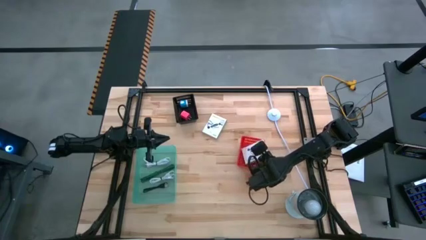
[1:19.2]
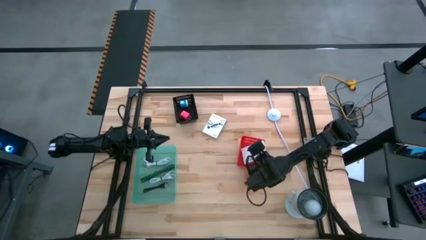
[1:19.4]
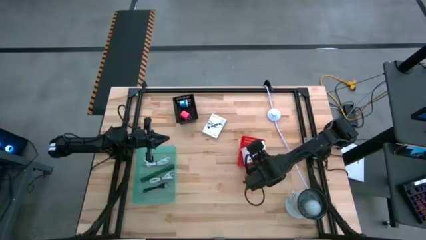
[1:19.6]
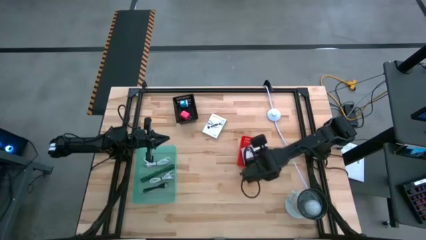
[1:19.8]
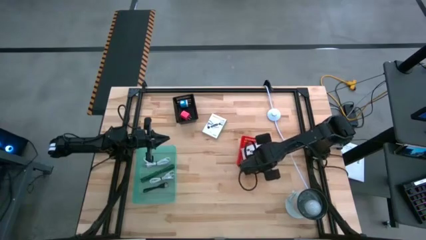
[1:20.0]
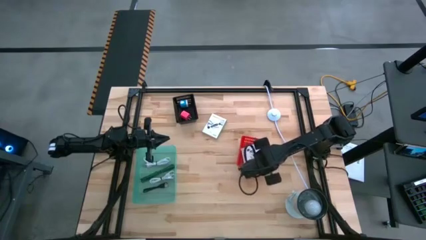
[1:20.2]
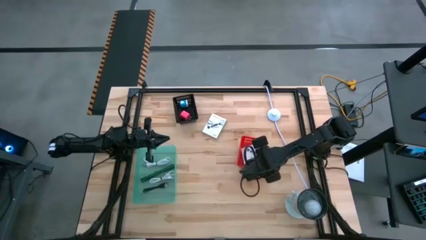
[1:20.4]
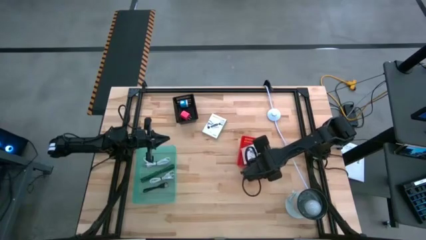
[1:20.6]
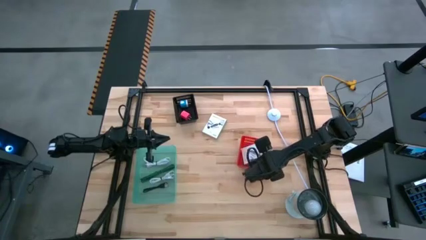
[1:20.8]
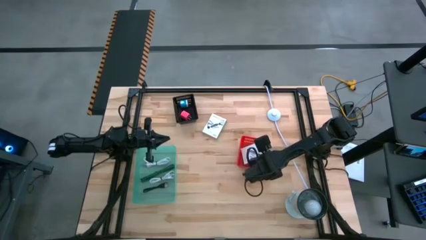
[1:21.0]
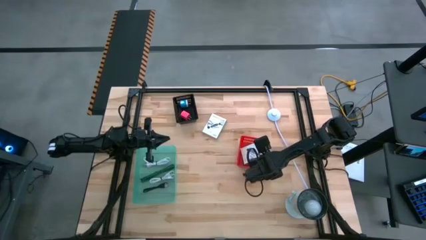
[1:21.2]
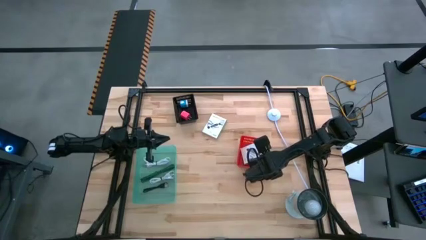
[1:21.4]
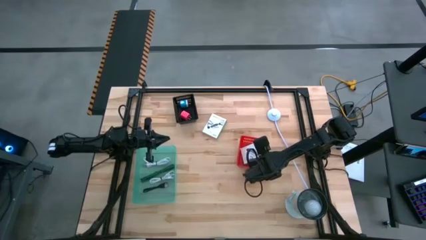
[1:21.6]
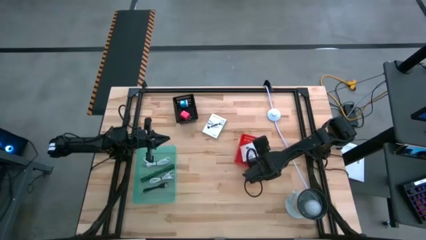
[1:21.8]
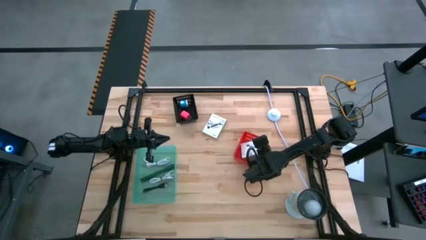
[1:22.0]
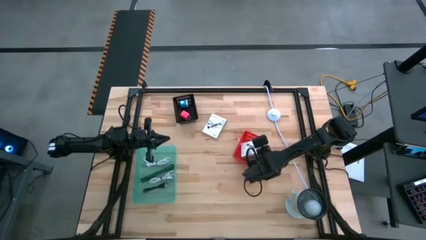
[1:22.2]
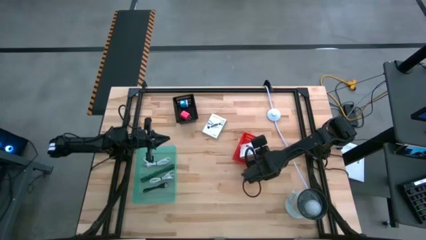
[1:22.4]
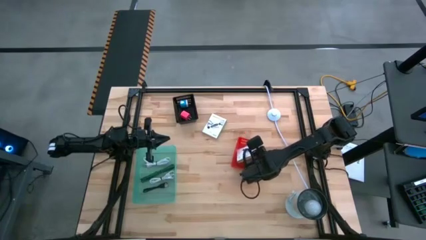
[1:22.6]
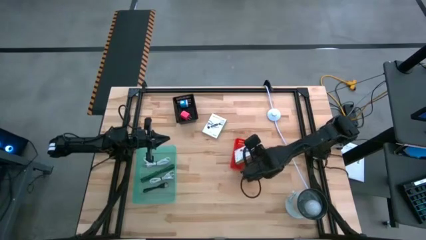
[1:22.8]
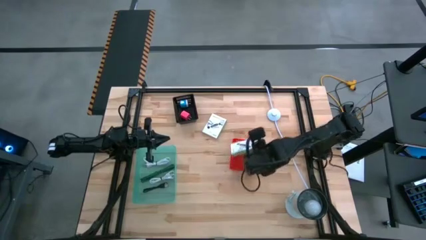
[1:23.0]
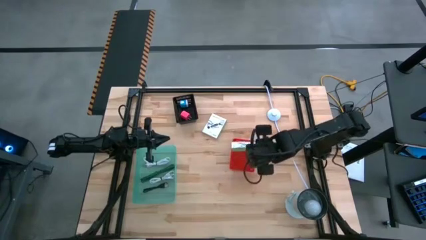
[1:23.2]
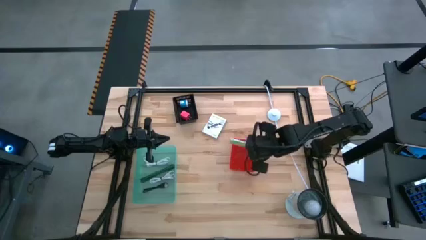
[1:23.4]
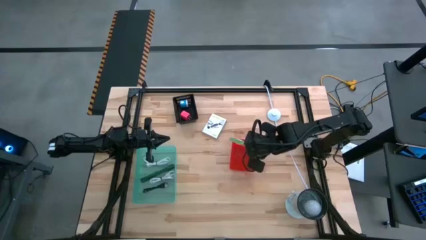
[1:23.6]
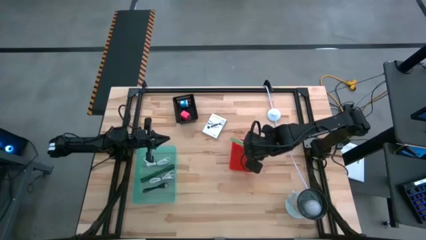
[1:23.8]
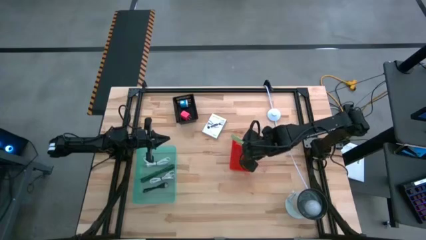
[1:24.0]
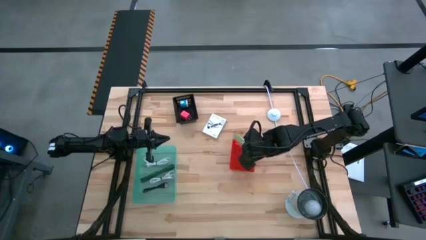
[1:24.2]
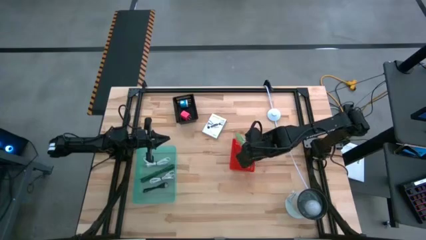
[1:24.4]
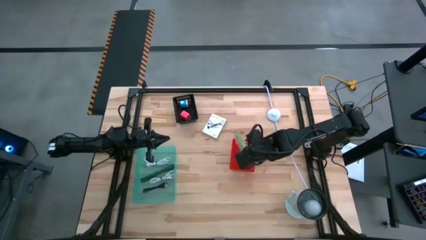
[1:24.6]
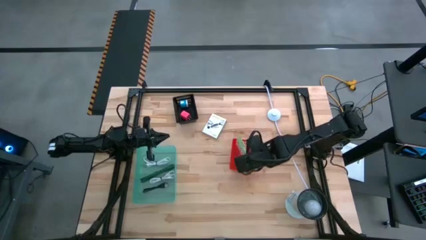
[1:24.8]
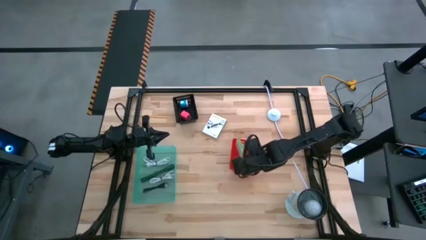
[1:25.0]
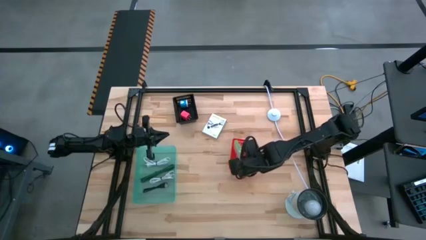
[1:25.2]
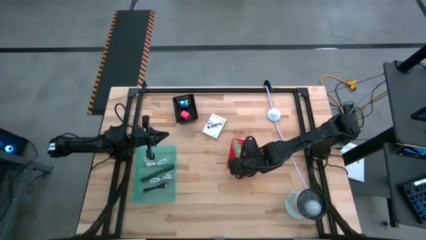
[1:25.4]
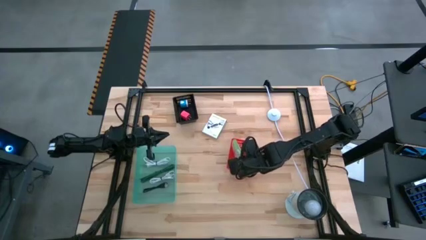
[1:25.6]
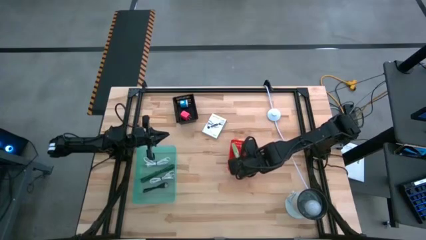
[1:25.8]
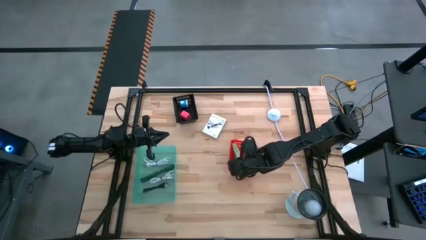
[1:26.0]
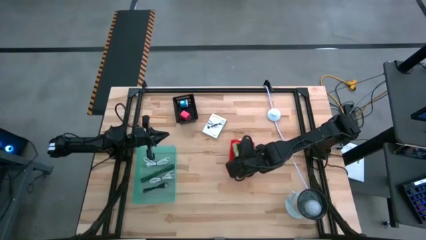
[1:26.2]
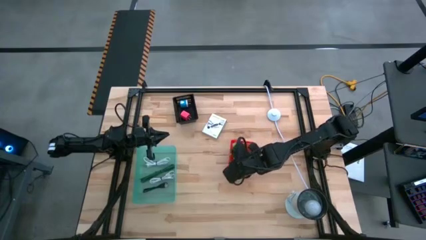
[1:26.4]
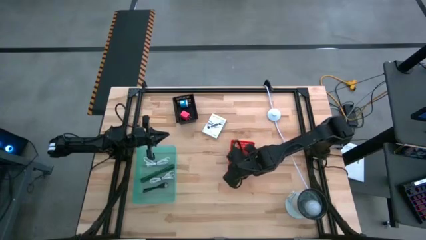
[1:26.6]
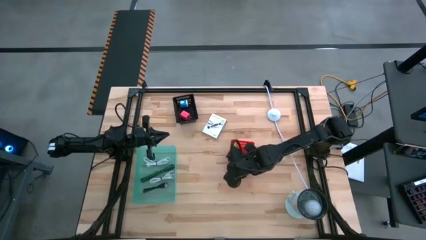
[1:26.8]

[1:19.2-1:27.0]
Task: Pick and place items into bin
Put the bottom white USB box into the orange bin

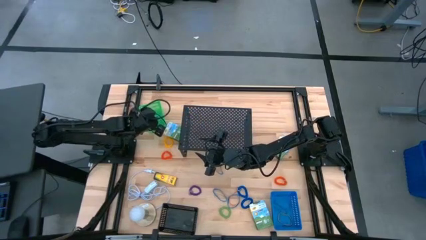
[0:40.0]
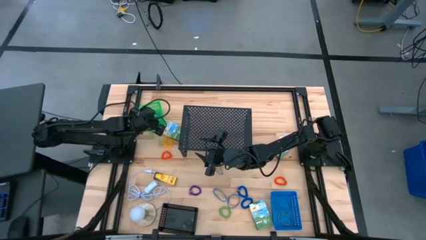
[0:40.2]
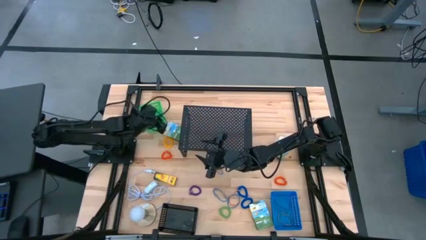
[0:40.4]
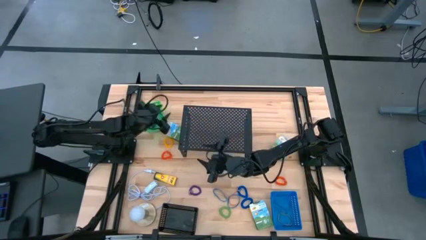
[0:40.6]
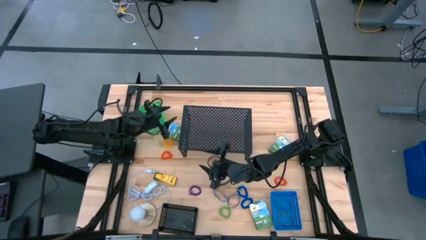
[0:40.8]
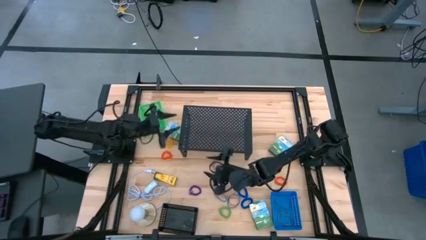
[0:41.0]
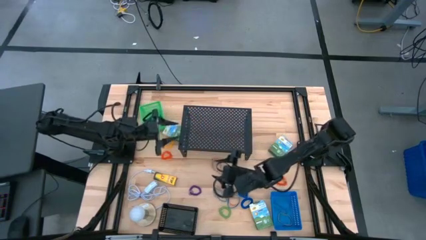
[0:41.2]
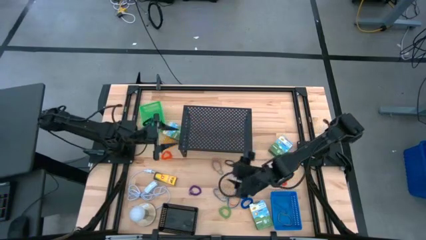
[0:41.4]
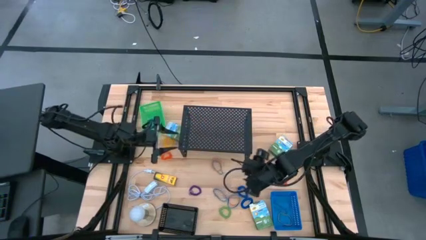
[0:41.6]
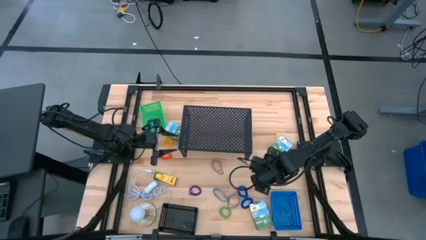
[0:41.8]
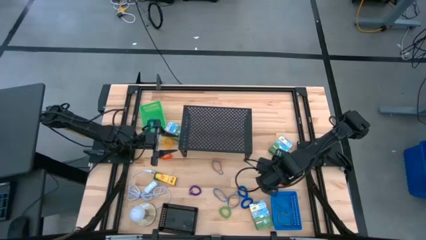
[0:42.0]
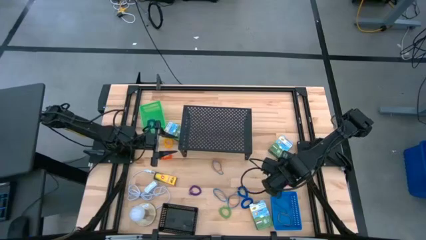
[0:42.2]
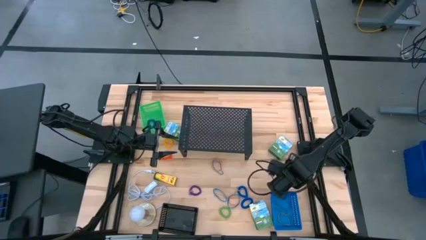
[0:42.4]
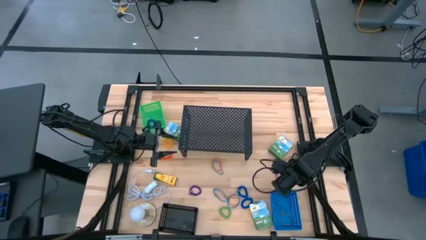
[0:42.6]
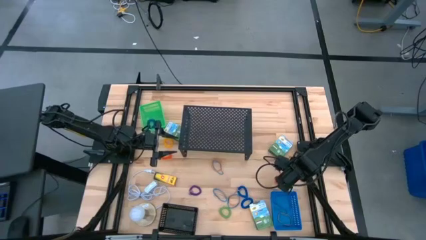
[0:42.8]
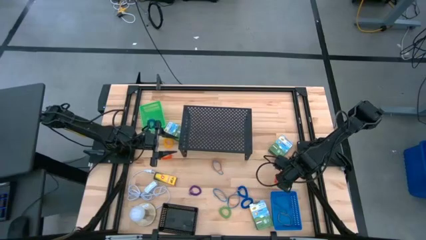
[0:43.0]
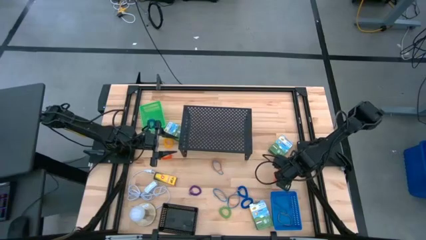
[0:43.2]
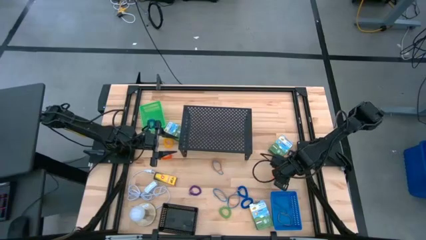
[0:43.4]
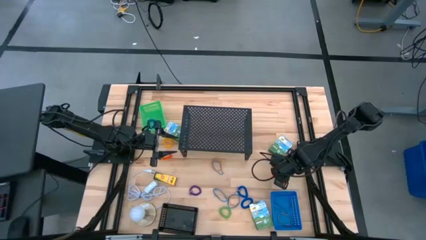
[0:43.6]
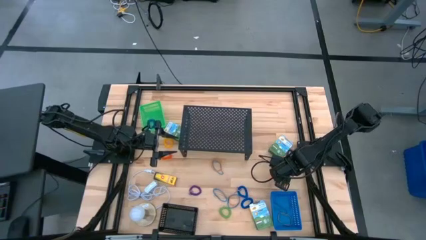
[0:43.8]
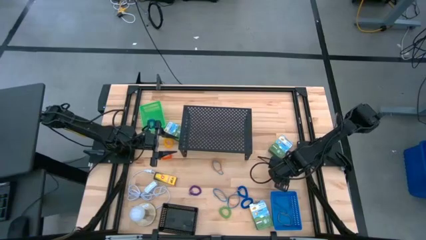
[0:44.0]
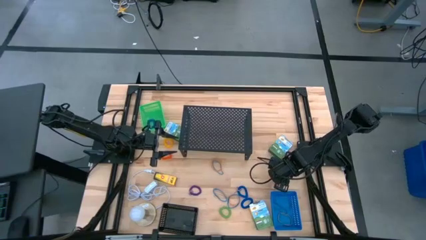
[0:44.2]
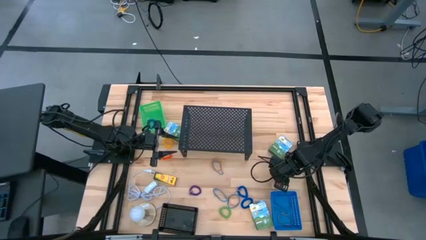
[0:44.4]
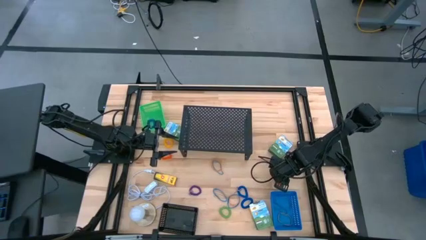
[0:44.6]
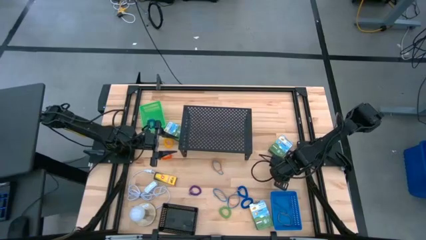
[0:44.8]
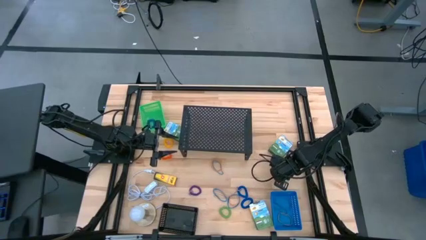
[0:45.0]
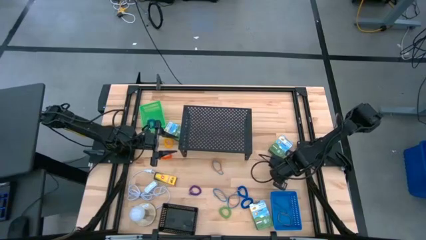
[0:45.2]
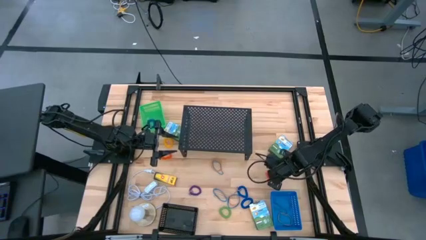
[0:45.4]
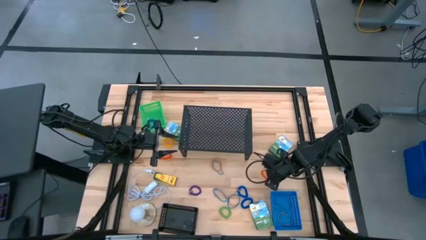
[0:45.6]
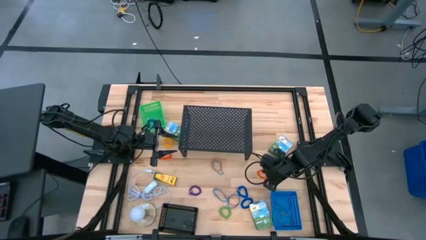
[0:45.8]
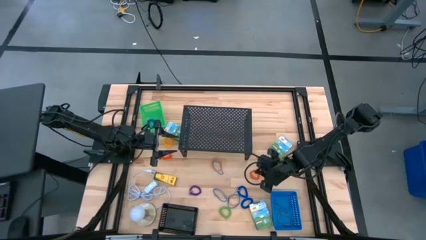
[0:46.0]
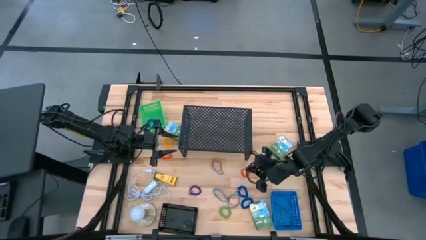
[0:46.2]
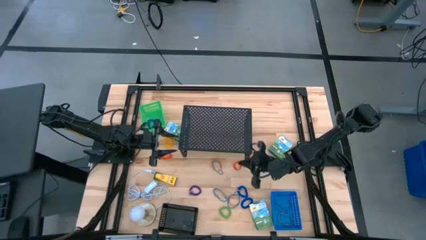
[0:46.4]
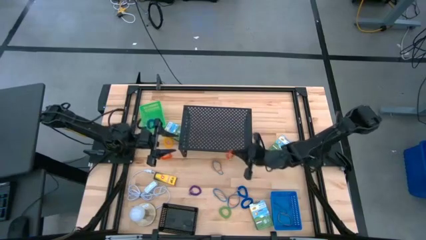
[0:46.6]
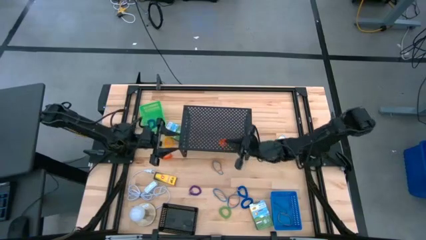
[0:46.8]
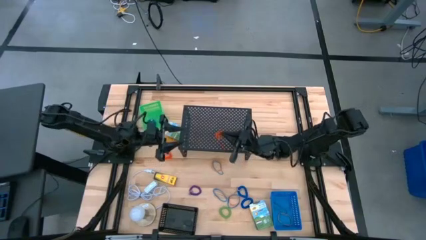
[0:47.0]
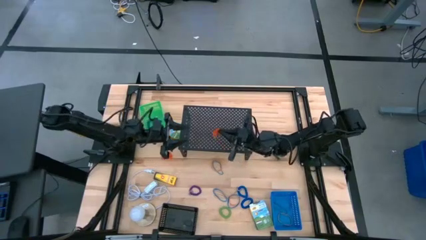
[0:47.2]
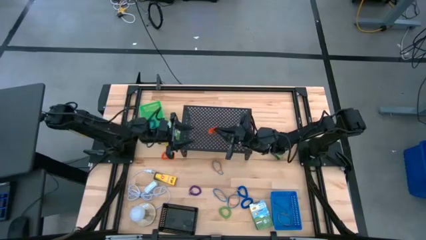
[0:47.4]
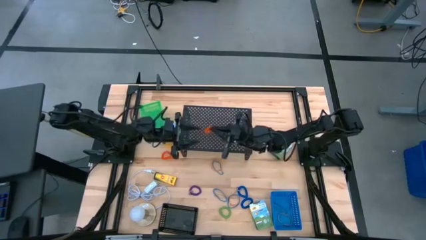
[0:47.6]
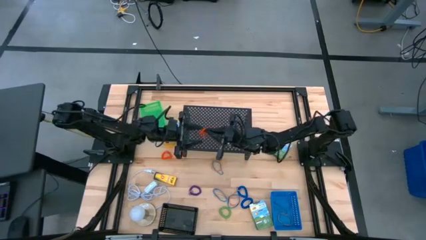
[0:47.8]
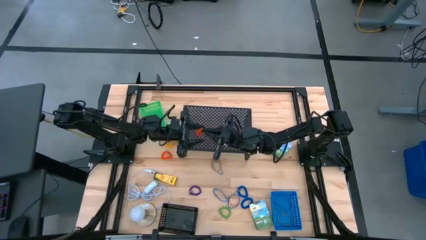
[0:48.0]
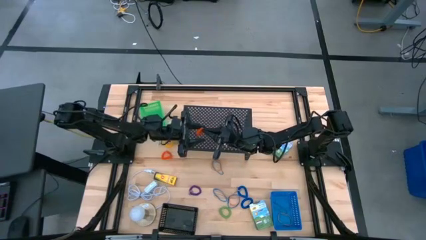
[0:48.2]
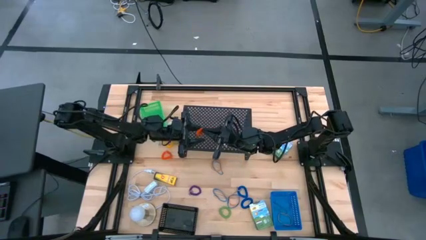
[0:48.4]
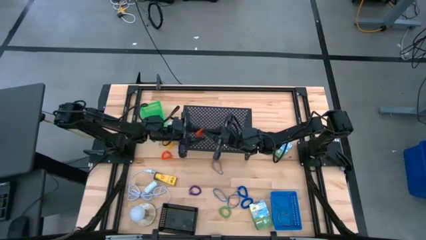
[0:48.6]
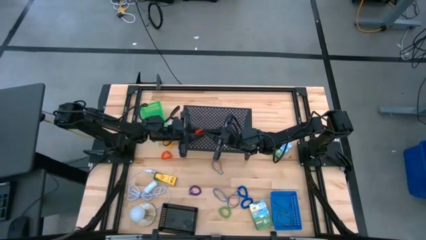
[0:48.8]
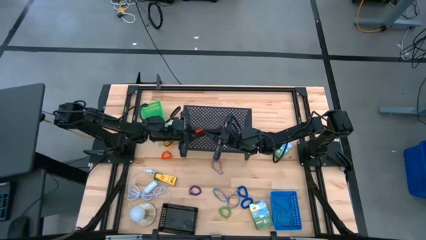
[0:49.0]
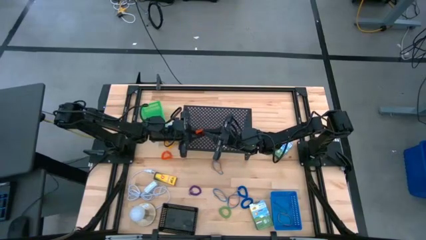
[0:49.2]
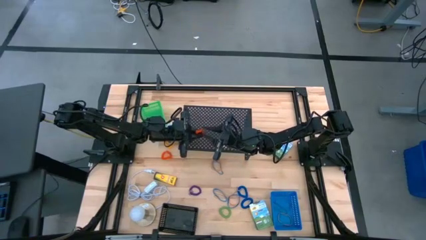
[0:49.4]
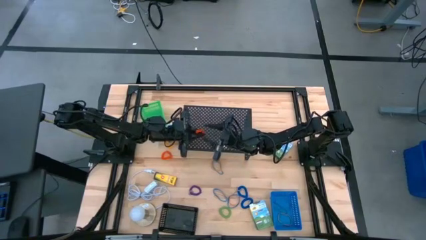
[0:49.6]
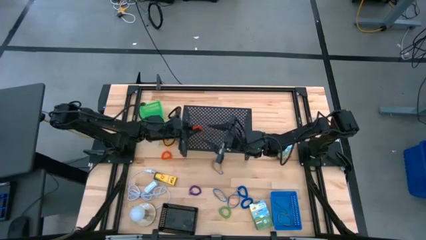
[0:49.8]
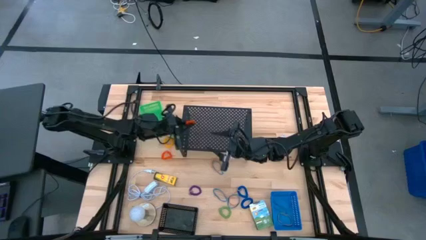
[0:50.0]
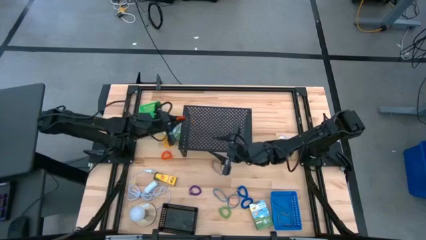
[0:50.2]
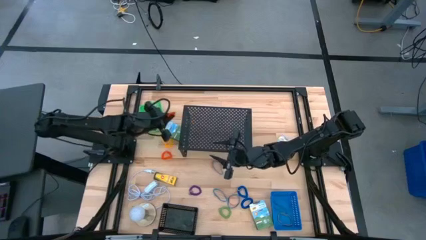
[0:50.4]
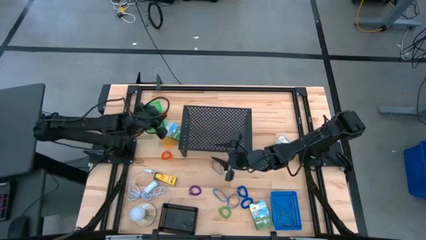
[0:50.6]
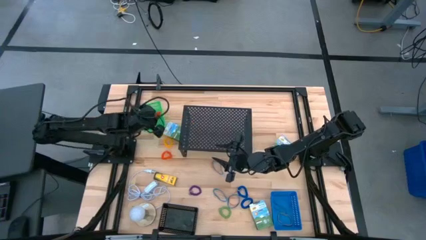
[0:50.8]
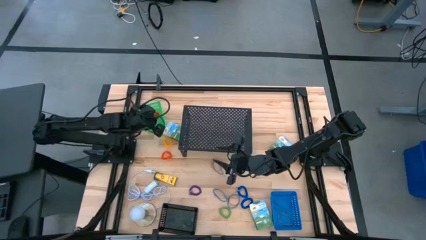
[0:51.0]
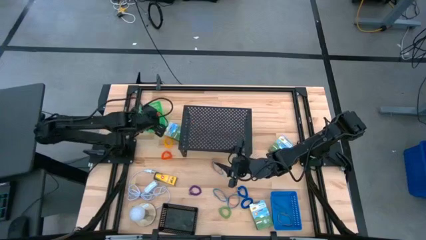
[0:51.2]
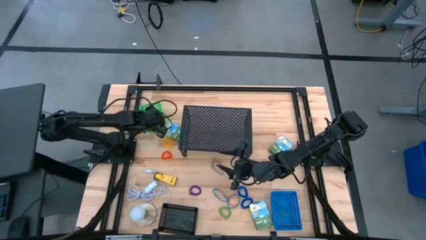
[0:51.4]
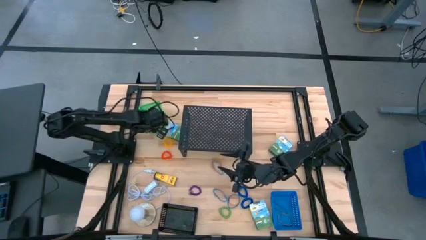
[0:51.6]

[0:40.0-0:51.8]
Task: Pick & Place Office Desk Supplies
Put the orange spring keychain into the green bin
